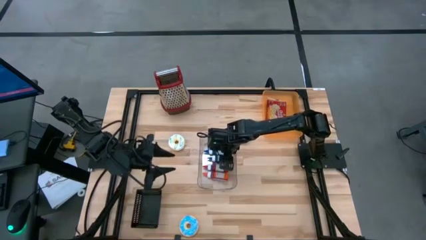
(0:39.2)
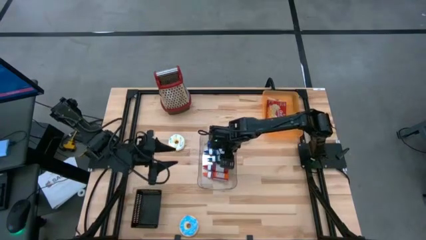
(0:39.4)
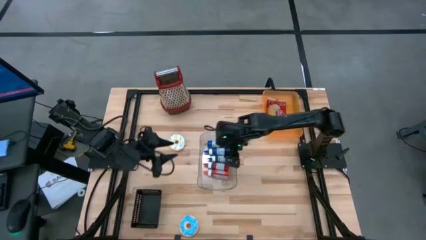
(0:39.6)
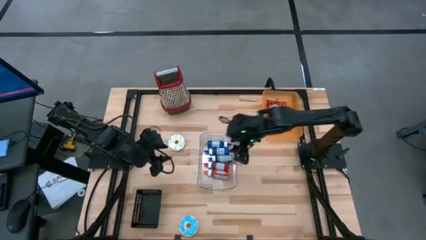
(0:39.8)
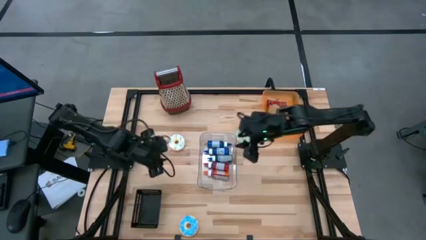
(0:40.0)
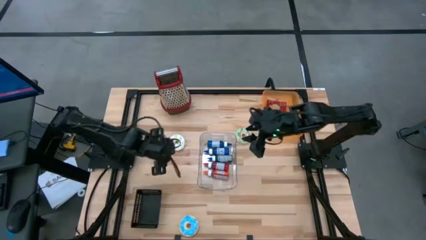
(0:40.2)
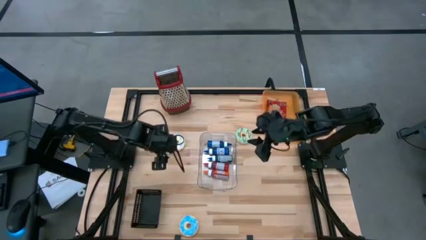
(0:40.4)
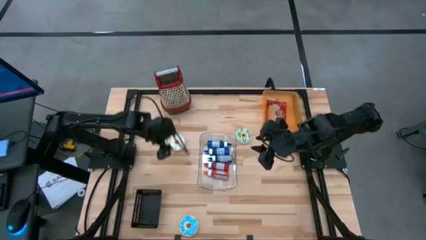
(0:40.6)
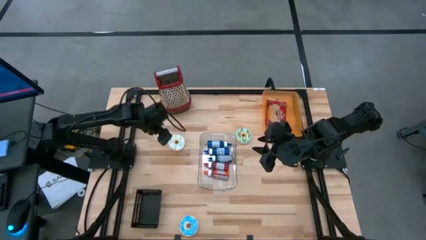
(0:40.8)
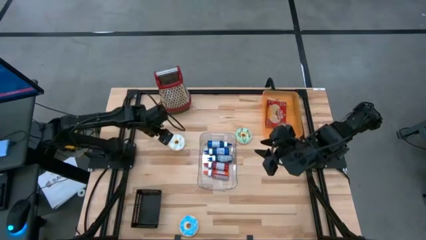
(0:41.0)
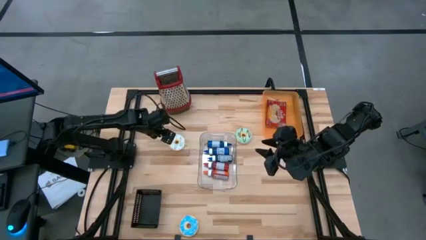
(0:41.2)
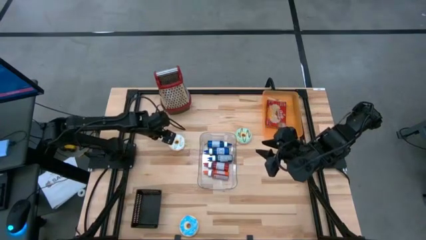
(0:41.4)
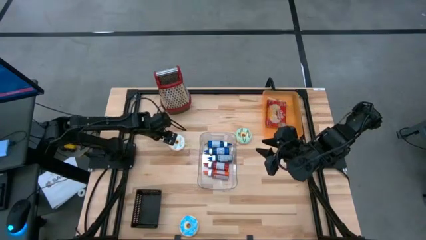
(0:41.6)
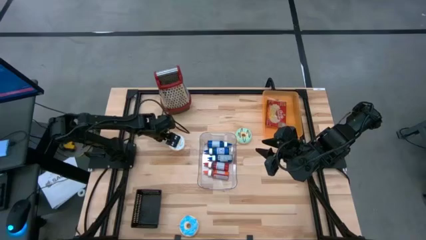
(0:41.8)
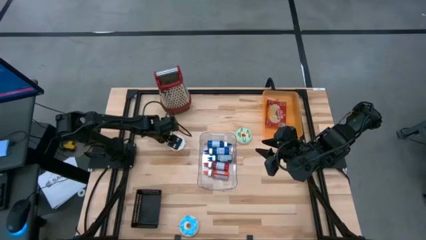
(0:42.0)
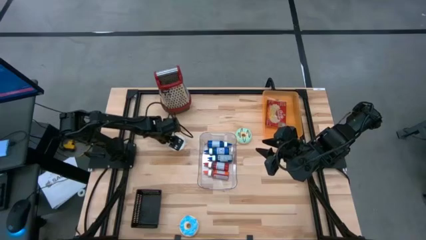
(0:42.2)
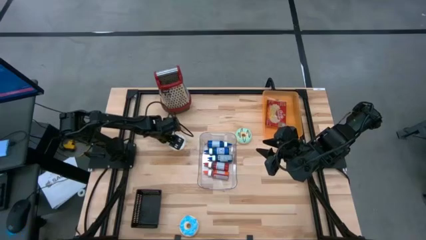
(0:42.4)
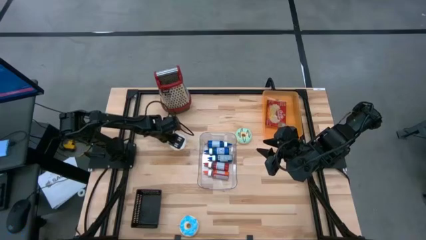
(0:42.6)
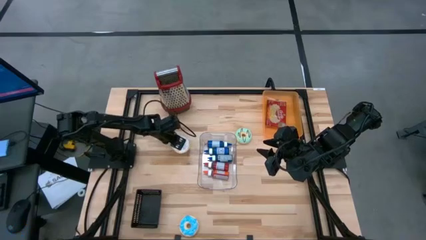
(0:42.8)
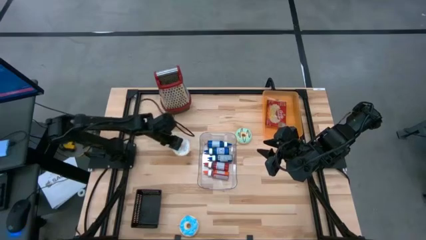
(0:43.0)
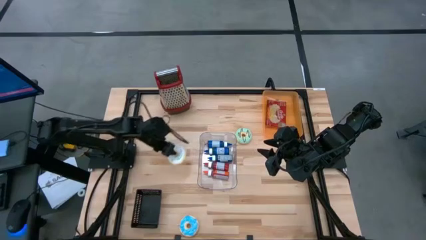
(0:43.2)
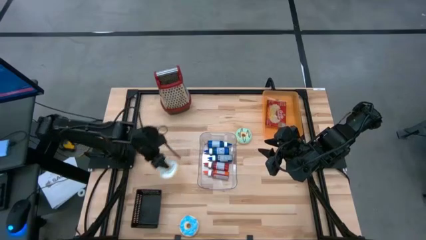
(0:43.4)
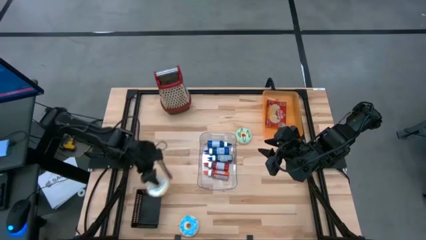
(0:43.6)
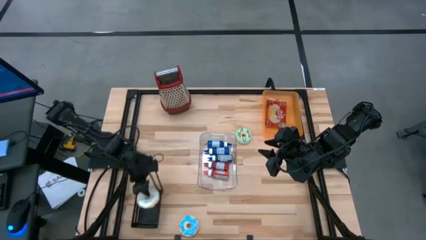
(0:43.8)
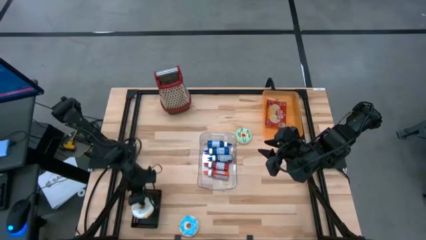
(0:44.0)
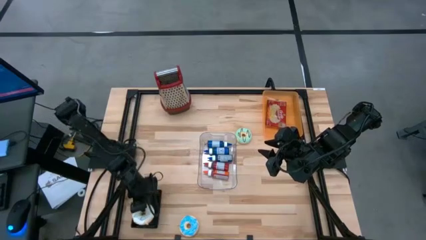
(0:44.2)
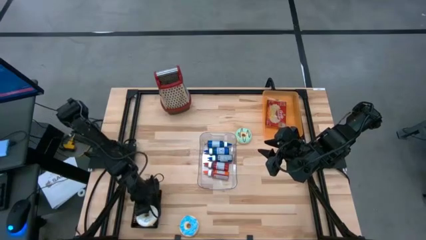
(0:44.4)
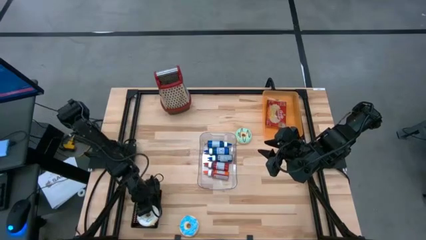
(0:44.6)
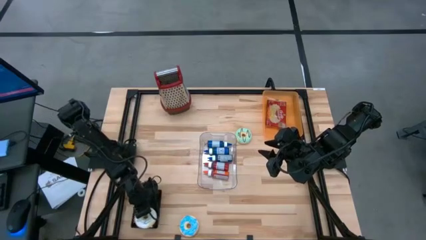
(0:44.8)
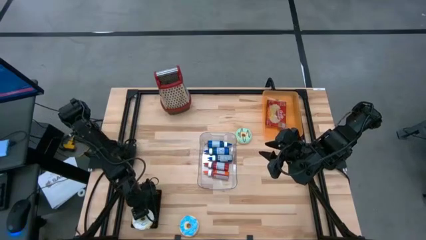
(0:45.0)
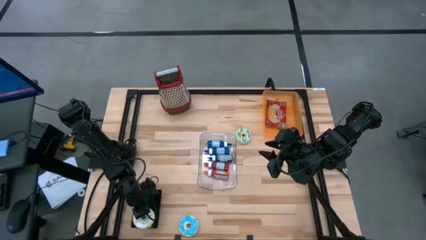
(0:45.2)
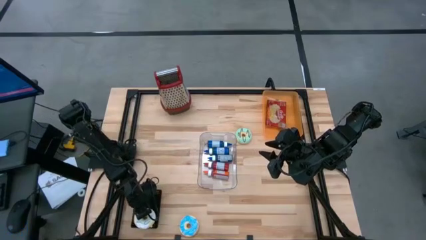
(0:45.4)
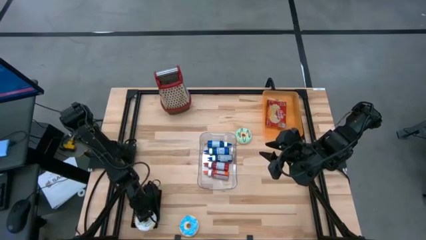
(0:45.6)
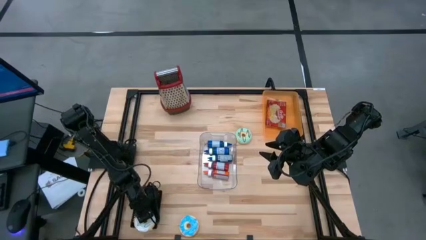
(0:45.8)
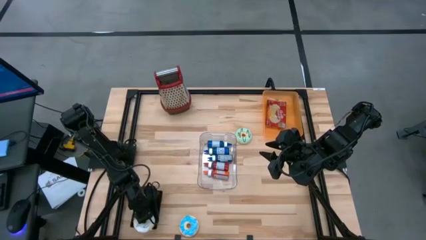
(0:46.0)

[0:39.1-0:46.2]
Put the white donut into the black bin

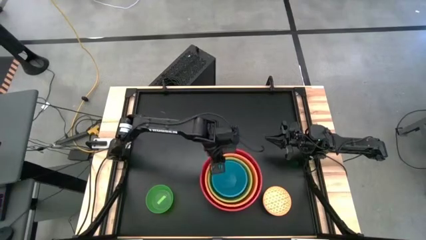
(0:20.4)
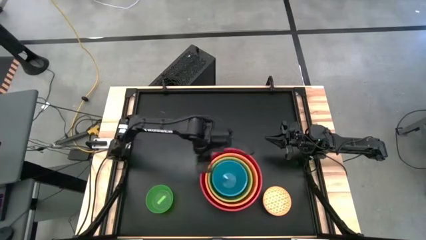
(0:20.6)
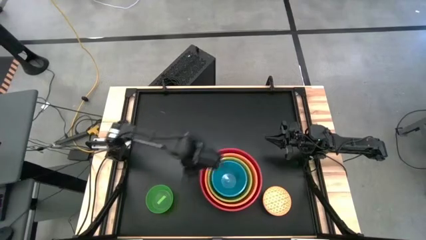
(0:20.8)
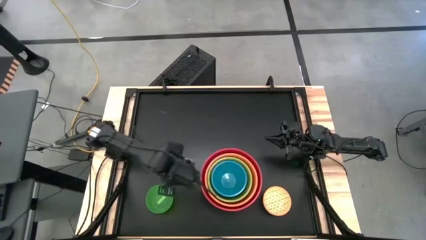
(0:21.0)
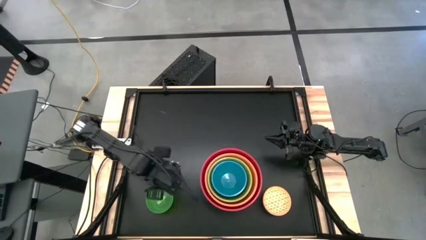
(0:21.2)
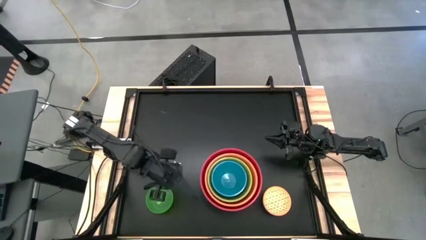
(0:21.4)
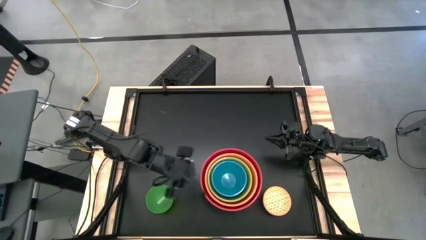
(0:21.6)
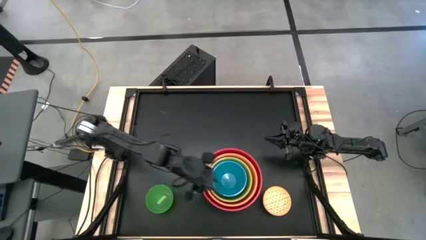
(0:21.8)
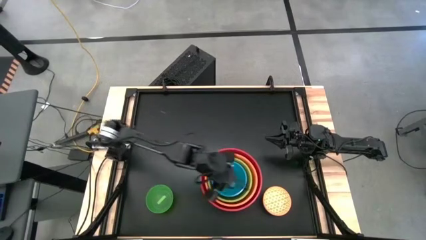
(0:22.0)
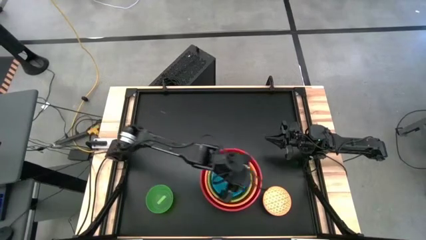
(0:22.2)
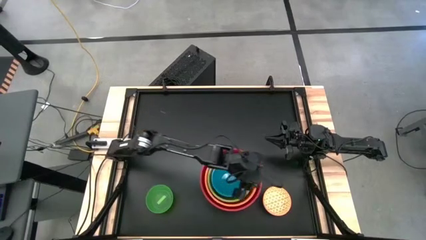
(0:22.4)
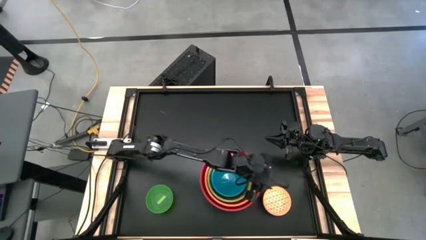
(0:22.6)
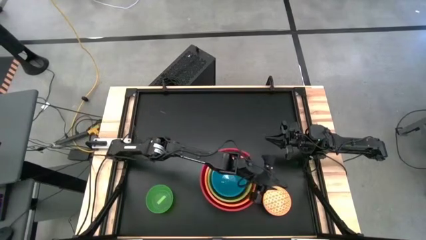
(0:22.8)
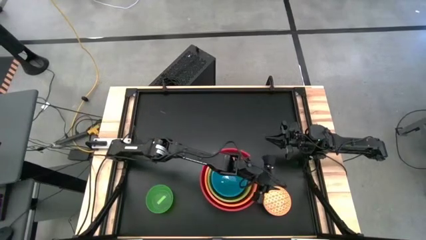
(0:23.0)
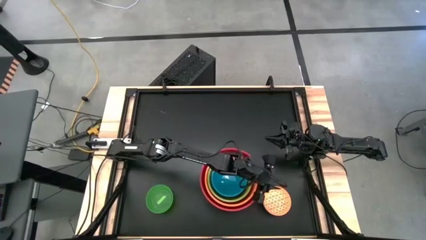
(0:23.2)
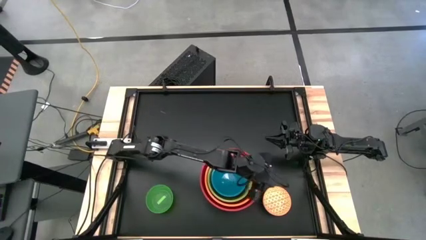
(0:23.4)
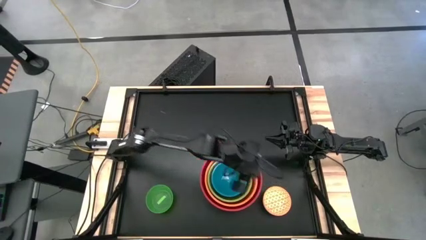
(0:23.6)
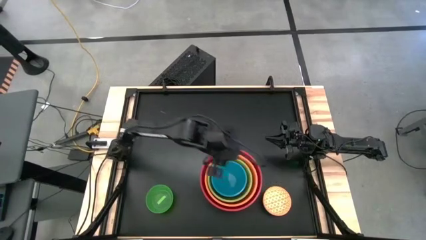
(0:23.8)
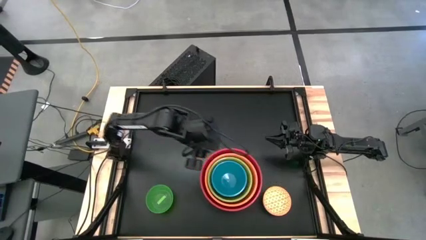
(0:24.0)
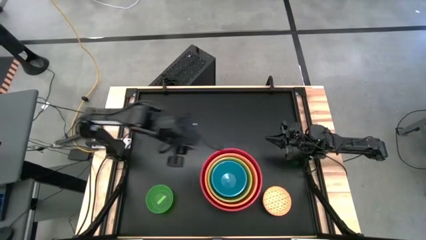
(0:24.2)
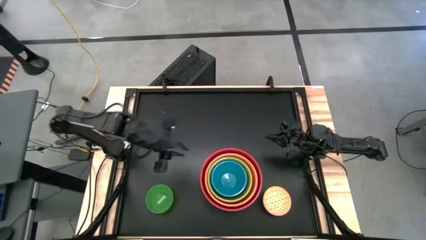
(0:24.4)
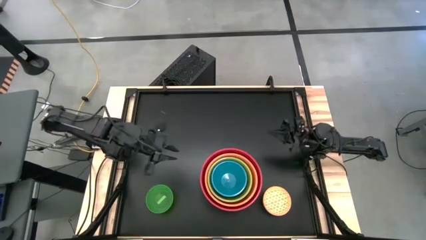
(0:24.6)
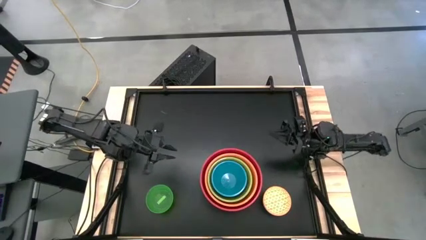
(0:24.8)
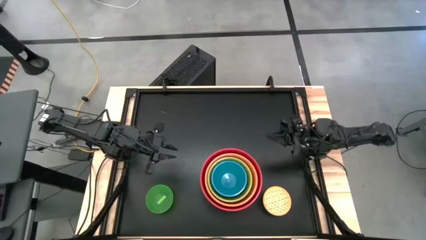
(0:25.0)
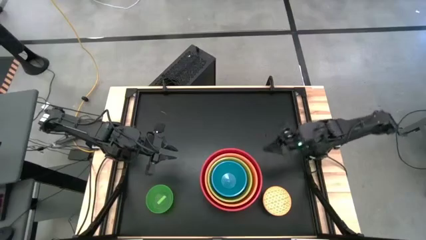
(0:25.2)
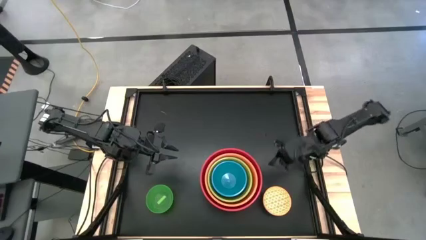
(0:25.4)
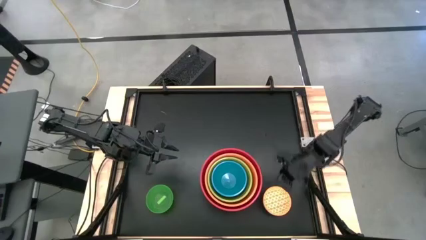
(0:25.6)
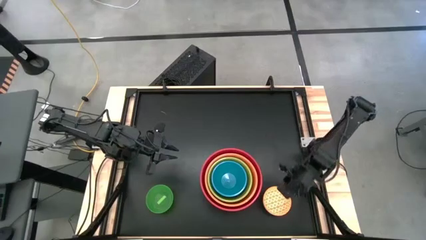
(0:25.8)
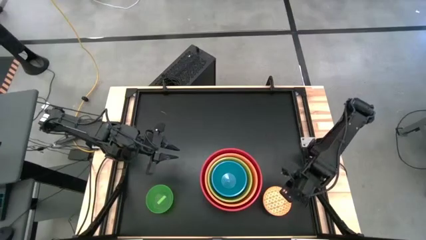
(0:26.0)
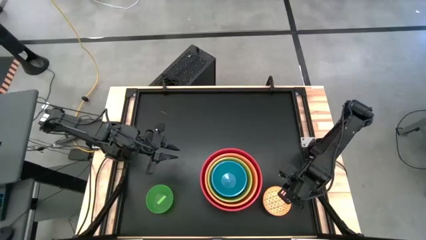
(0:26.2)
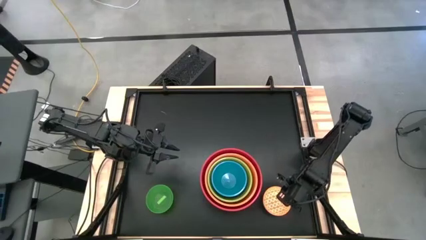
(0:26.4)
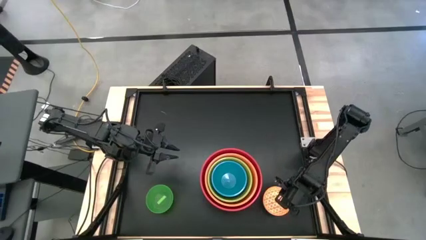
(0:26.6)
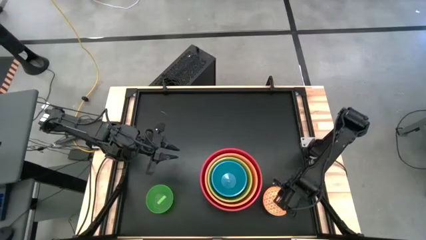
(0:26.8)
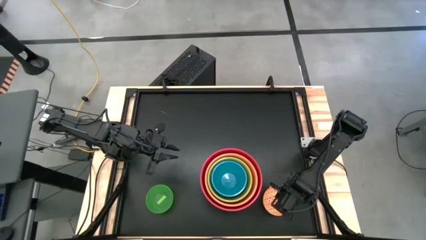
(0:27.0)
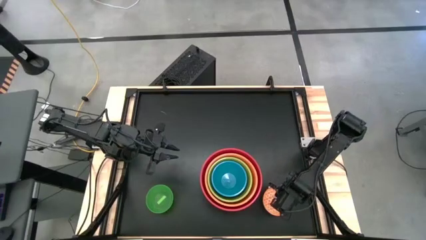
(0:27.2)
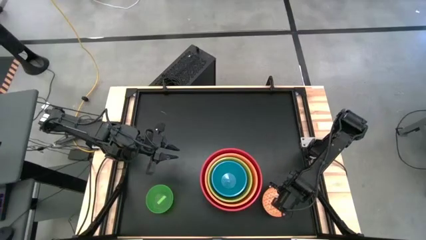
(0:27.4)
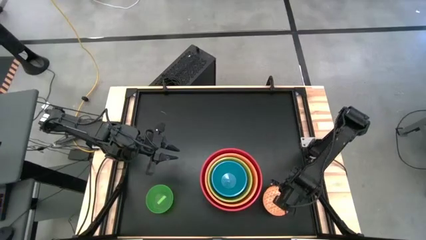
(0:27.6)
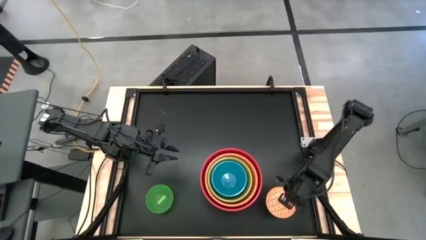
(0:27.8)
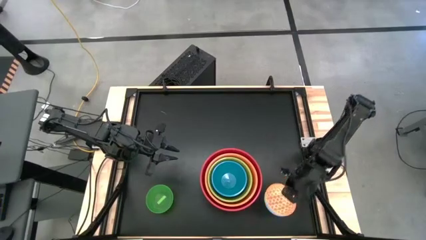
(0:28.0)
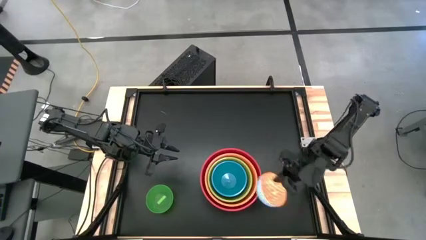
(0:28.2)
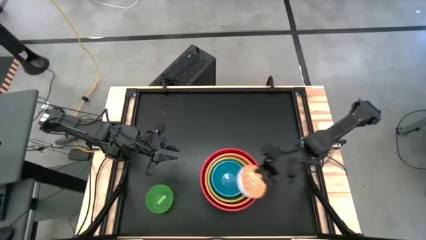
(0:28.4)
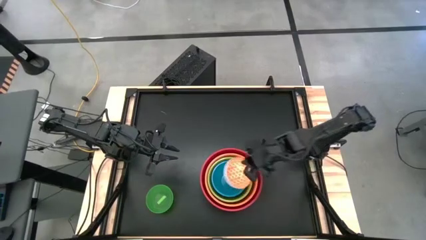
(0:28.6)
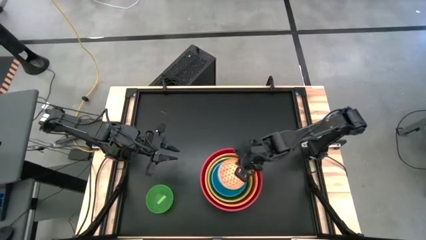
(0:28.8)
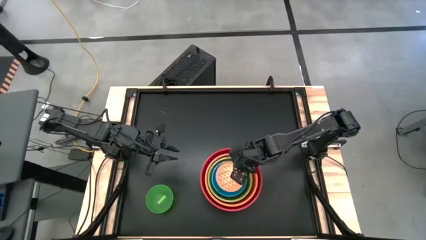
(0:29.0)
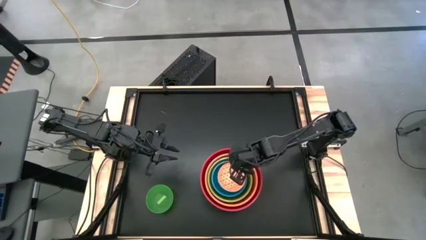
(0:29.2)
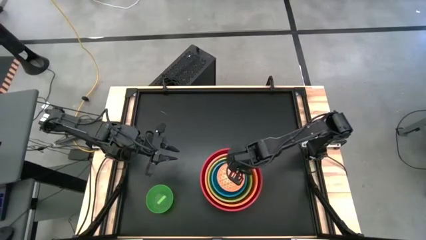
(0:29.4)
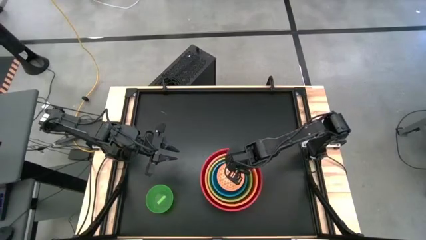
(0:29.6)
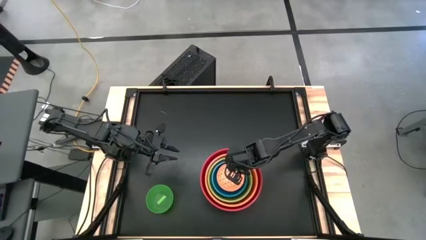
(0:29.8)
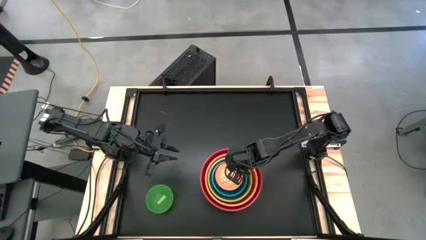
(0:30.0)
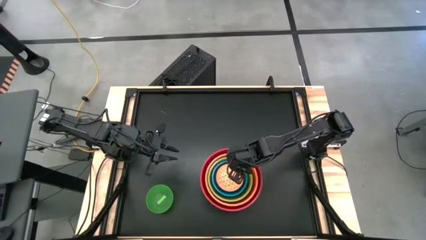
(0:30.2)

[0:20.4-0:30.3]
Stack the orange patterned bowl on top of the blue bowl
